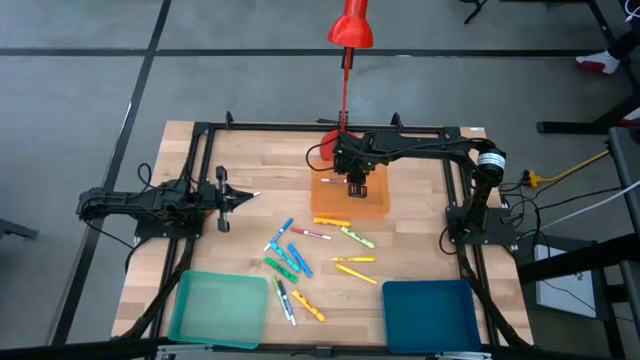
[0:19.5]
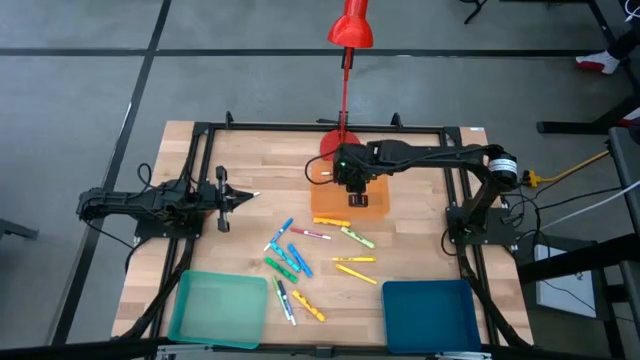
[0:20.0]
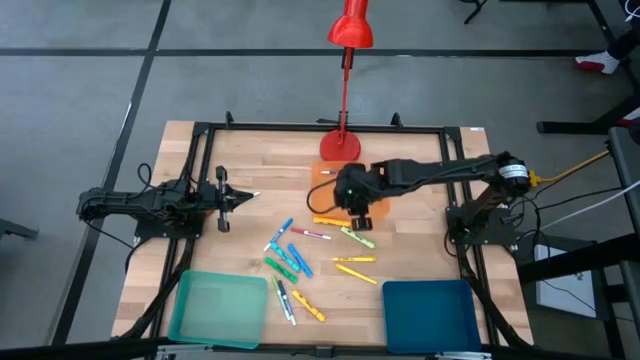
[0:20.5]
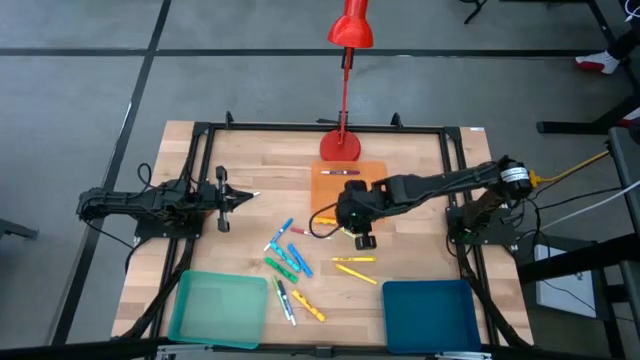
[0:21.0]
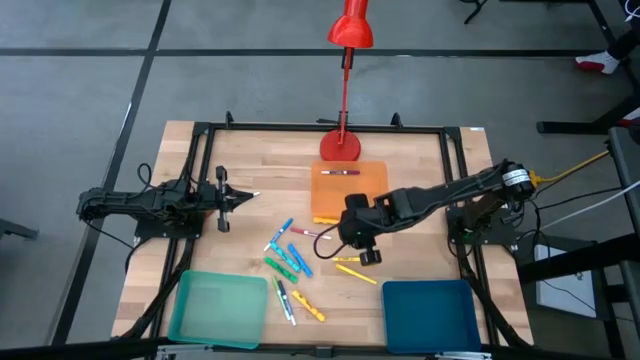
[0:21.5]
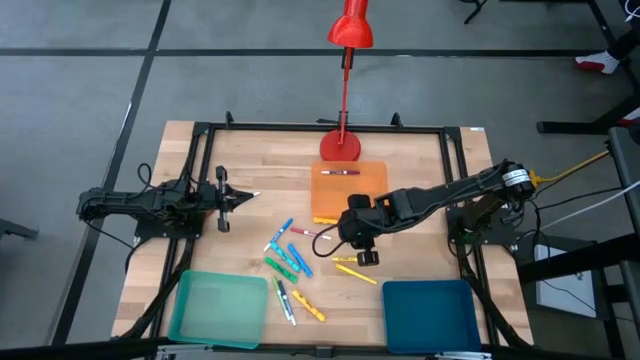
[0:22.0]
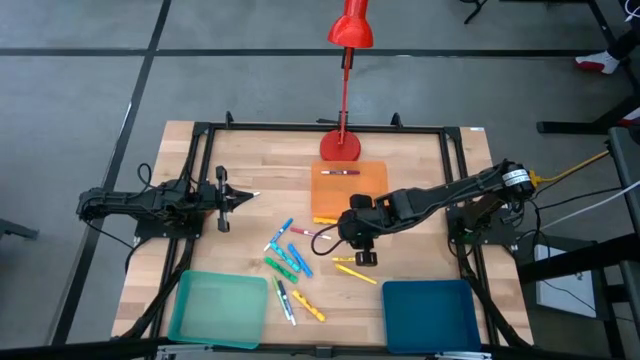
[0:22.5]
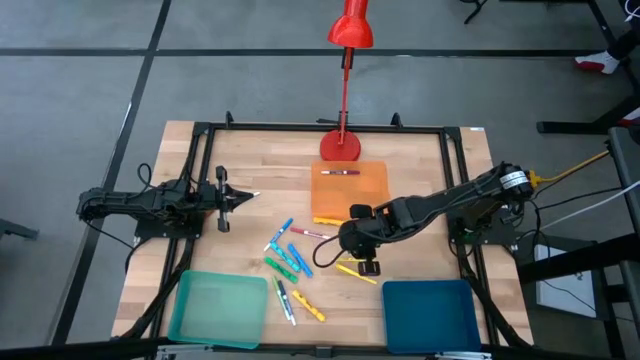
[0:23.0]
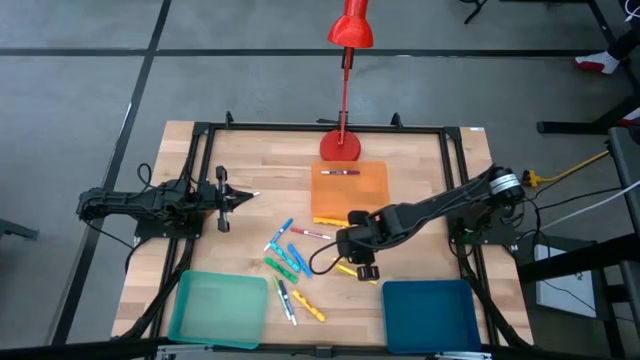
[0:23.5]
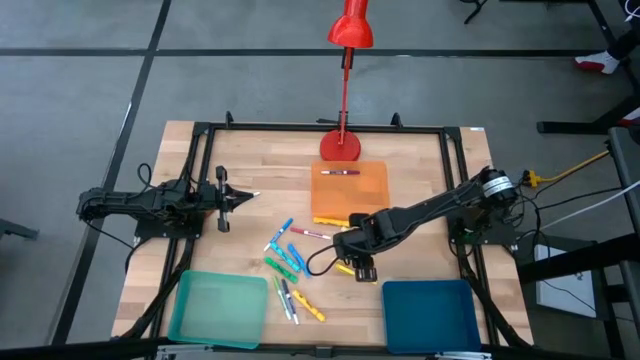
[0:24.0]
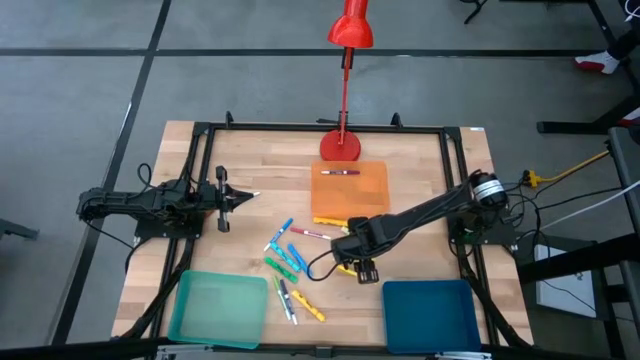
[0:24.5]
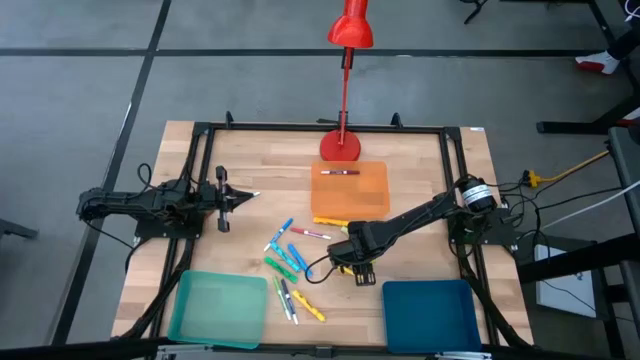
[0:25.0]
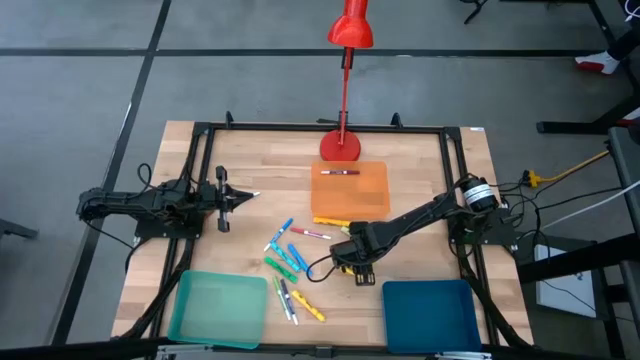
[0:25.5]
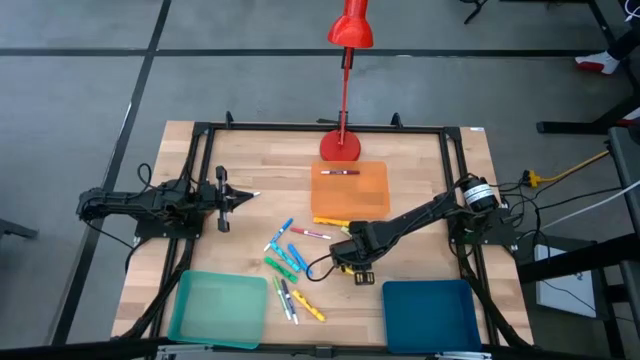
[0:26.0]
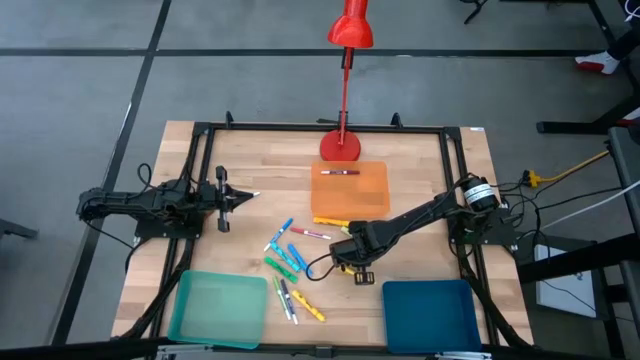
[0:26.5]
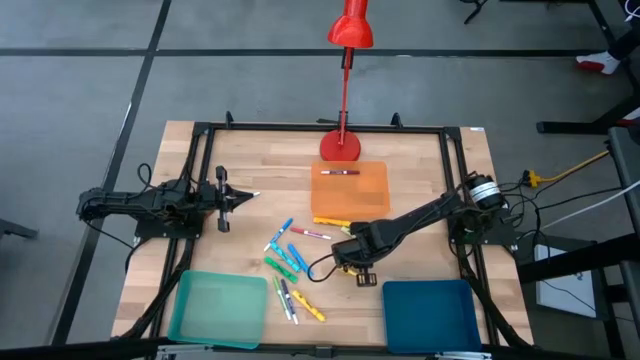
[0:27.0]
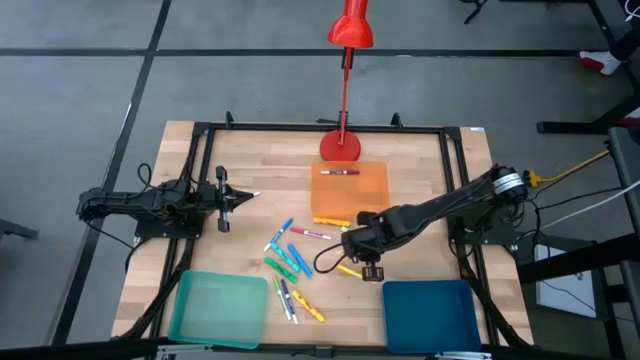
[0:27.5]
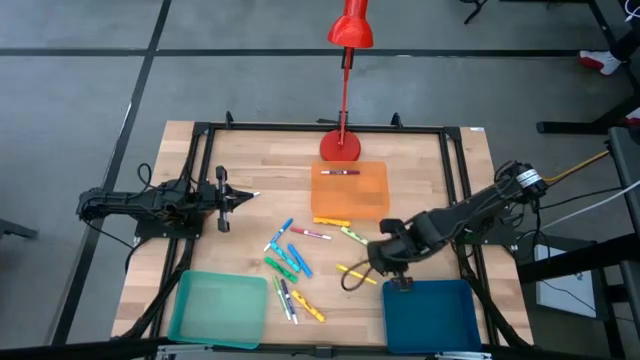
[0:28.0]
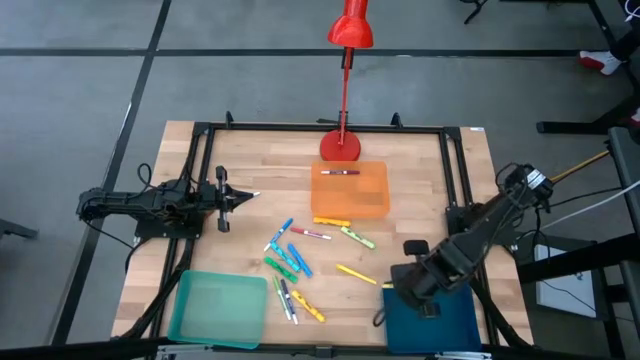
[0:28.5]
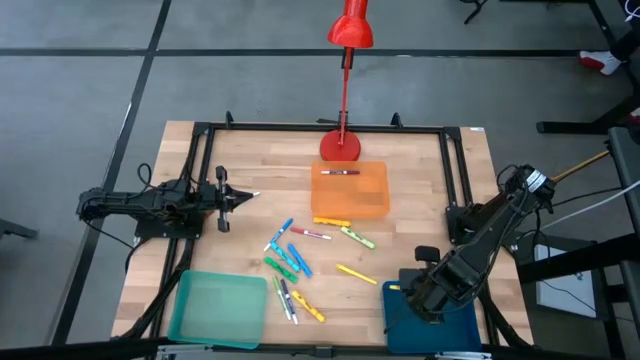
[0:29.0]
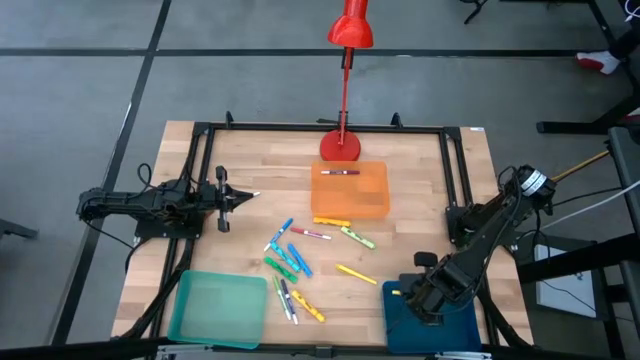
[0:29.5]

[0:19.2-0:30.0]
Task: Pick & Place Markers
Put the top yellow pen into the blue bin

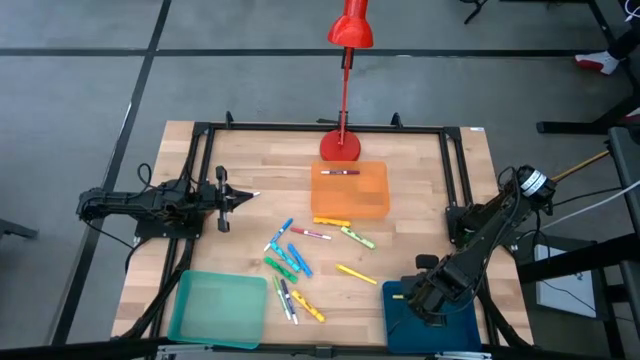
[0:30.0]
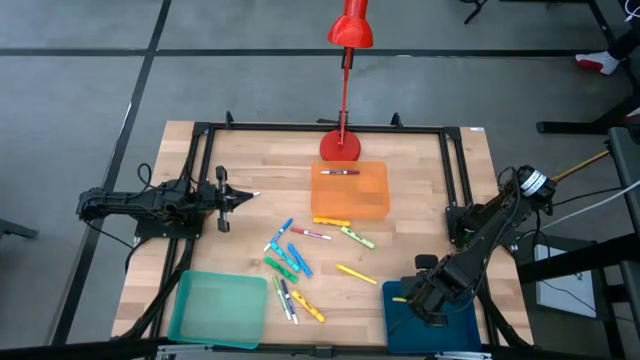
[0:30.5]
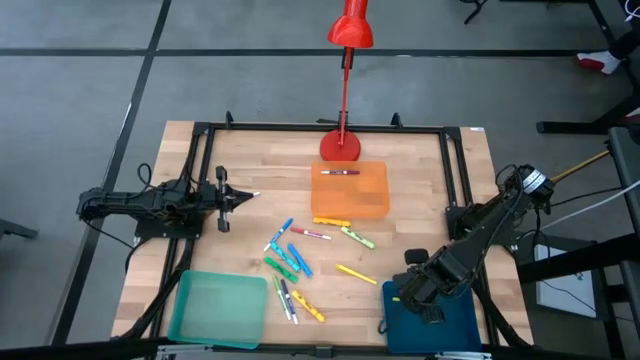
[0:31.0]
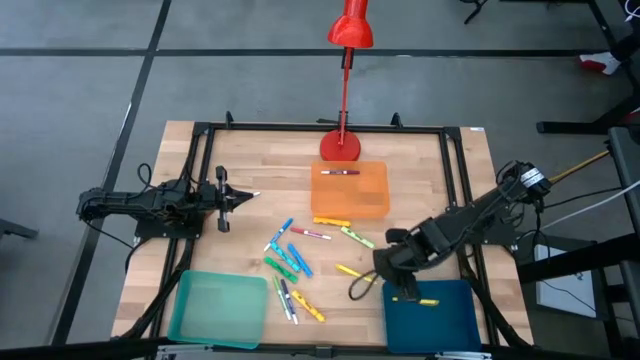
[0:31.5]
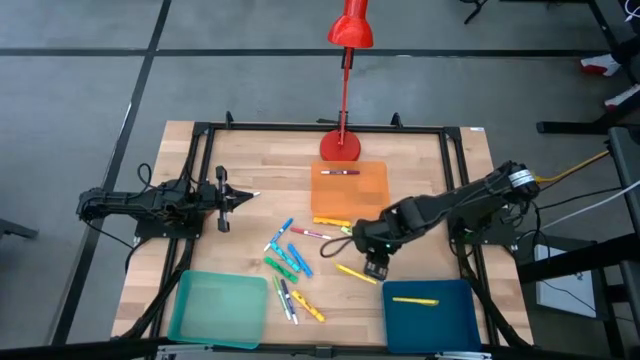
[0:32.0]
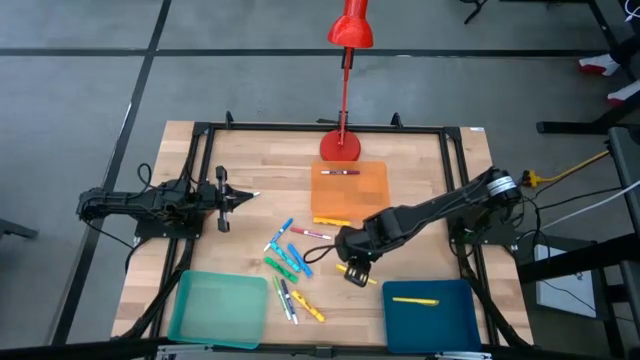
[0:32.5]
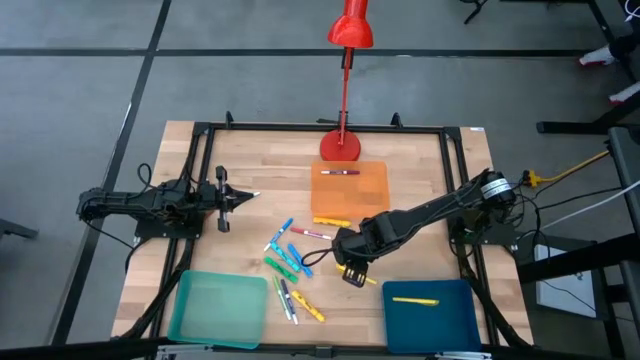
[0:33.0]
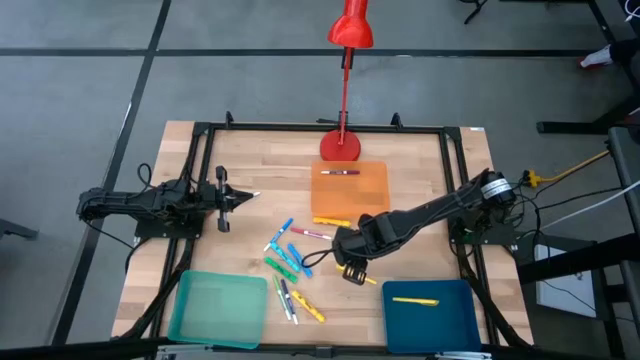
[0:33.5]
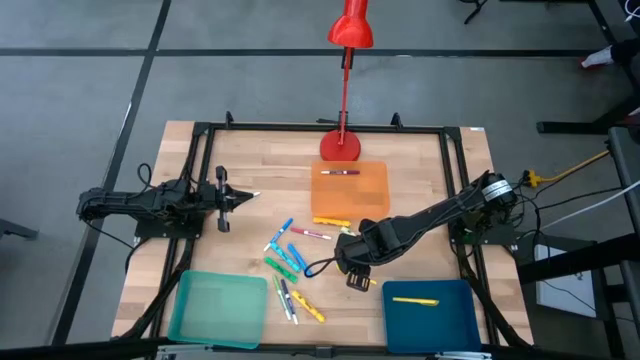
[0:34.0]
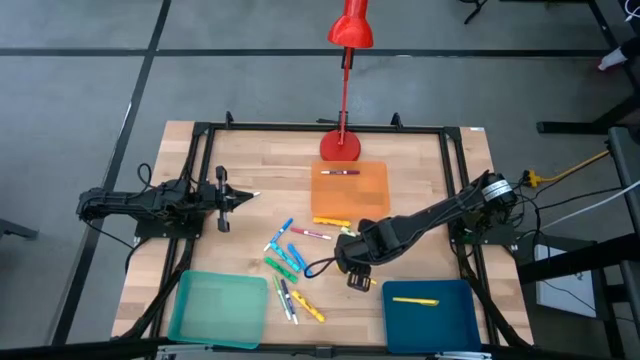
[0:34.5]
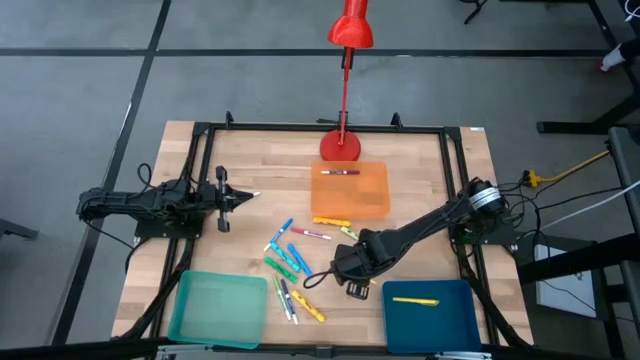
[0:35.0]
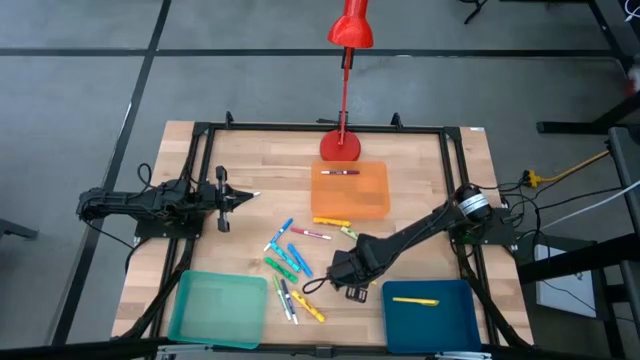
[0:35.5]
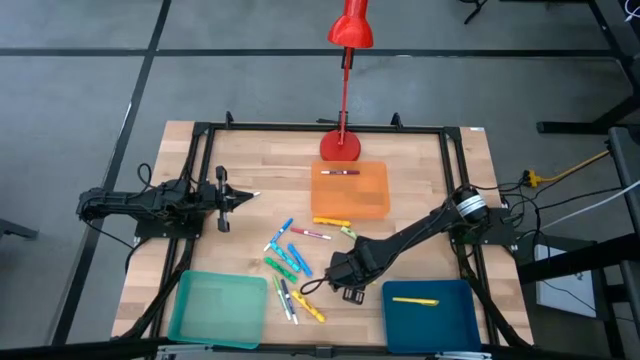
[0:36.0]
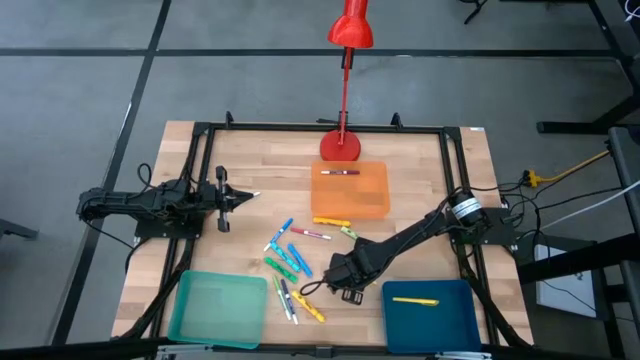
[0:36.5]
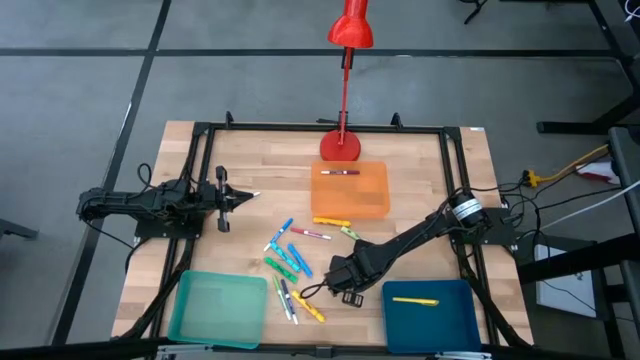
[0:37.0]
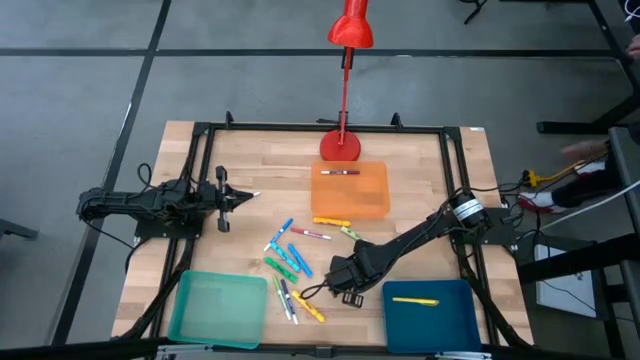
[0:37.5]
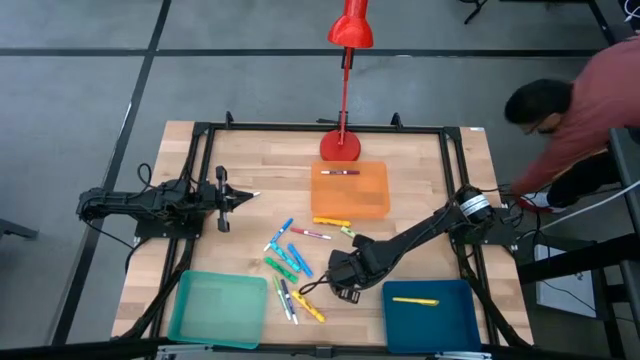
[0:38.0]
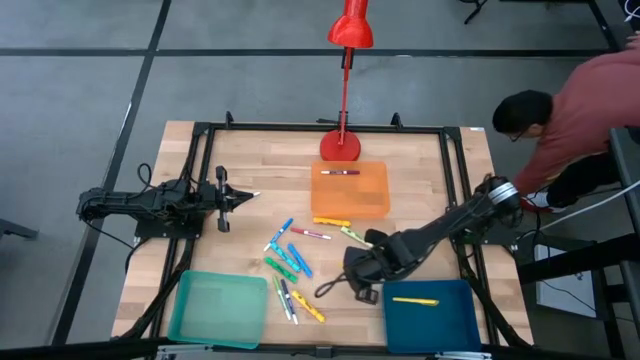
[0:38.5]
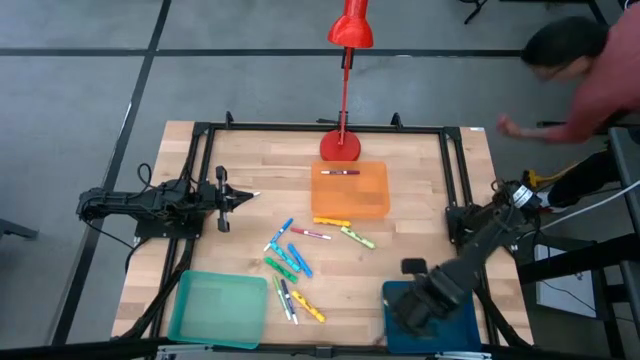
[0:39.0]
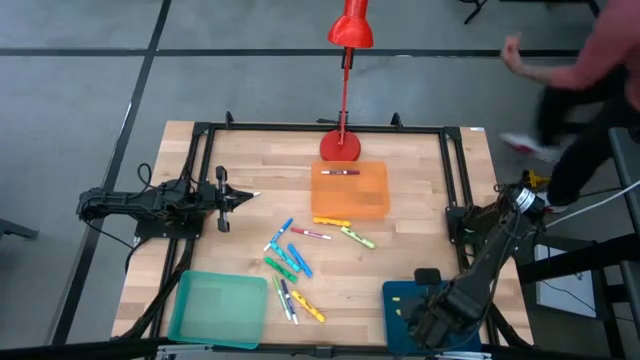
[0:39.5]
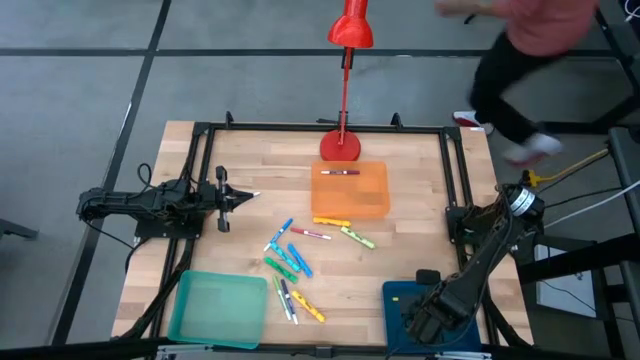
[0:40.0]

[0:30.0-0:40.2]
Put the yellow pen into the blue bin
